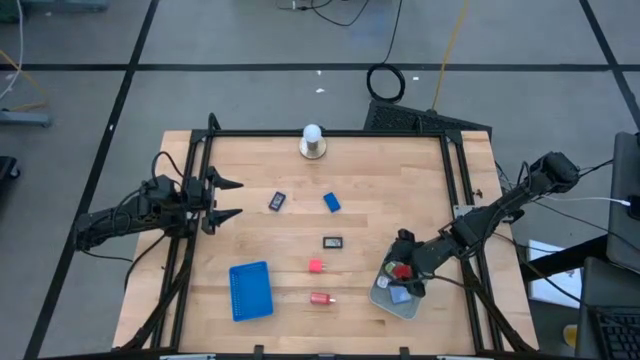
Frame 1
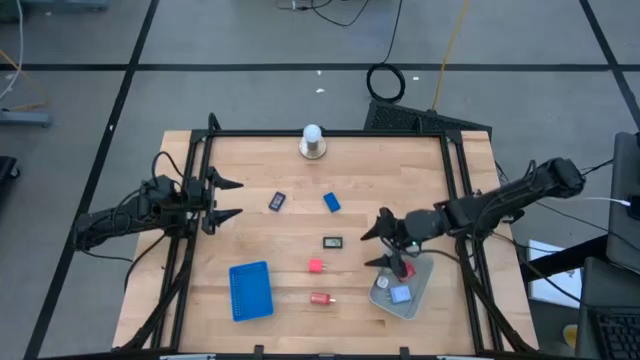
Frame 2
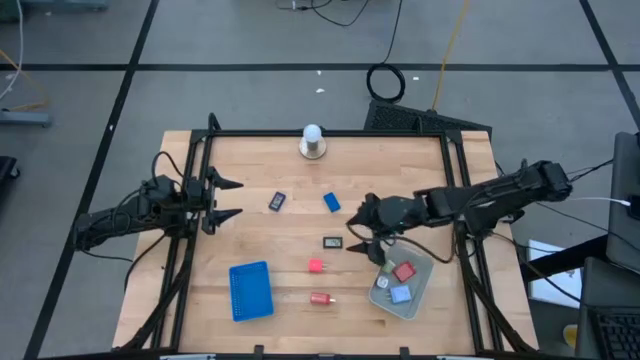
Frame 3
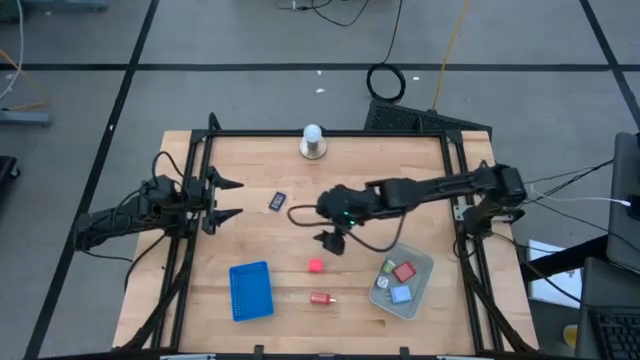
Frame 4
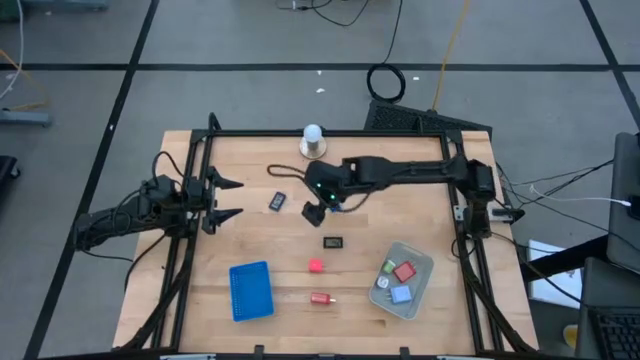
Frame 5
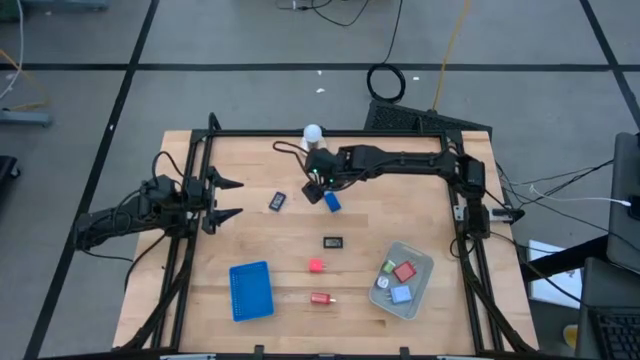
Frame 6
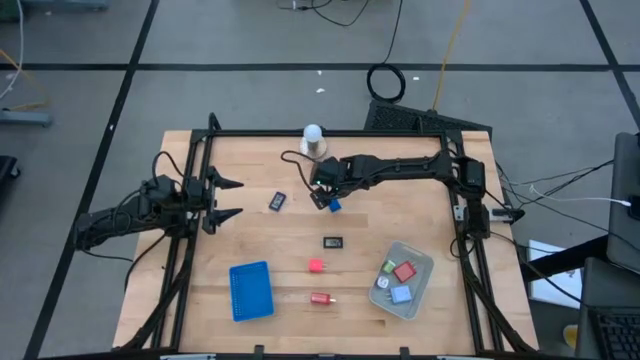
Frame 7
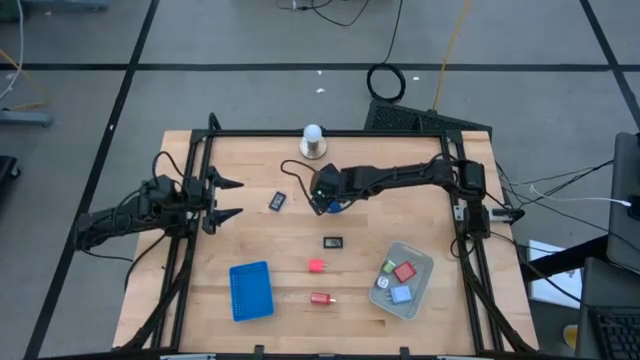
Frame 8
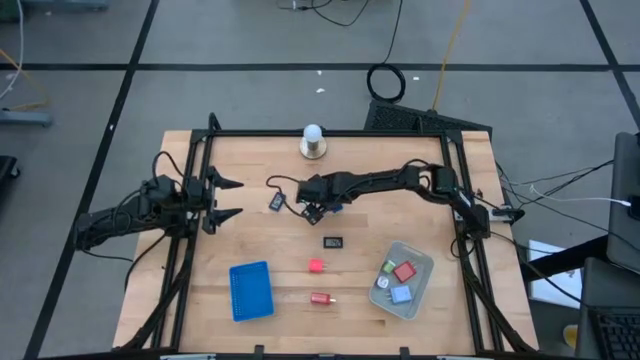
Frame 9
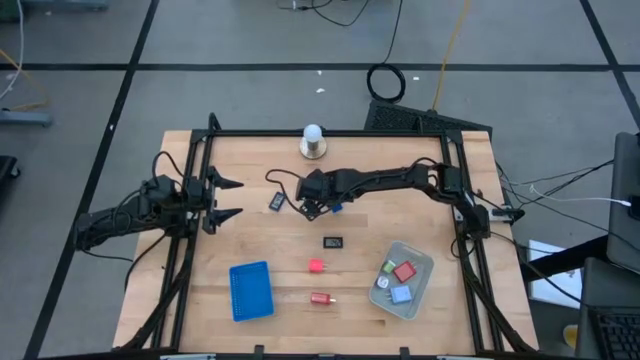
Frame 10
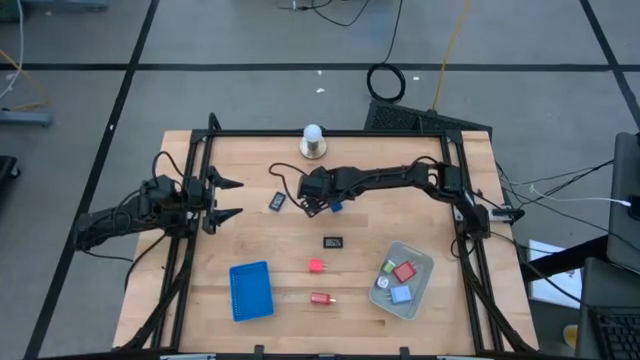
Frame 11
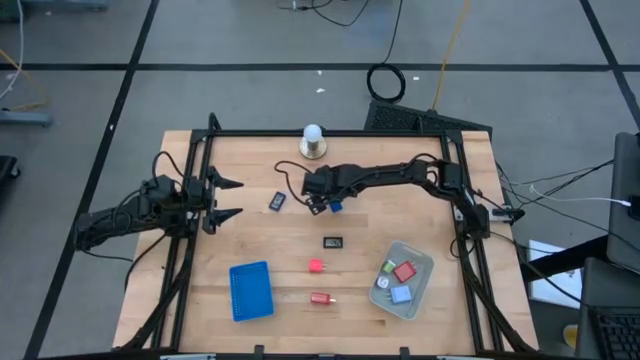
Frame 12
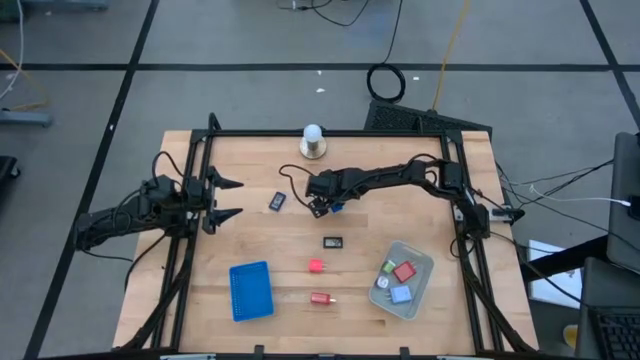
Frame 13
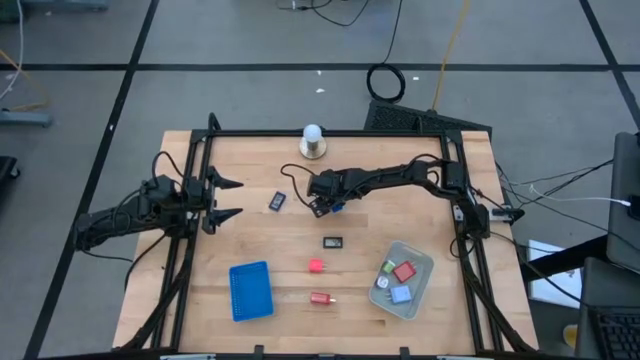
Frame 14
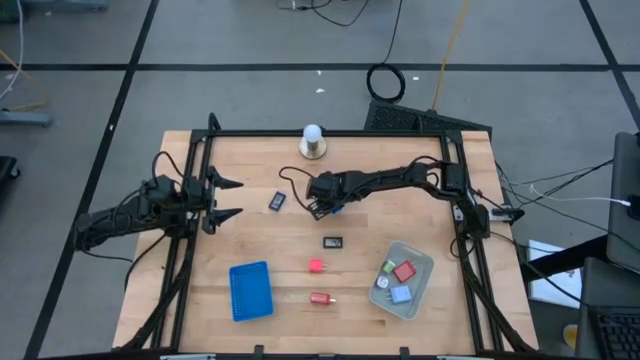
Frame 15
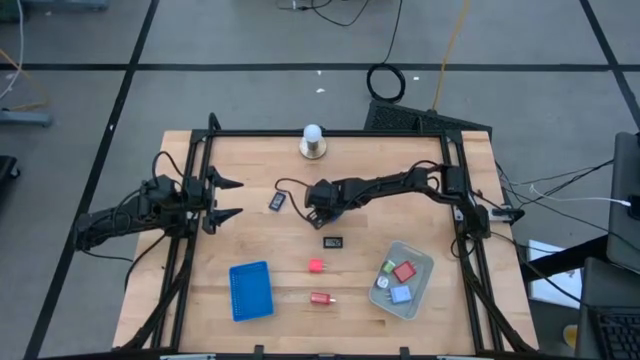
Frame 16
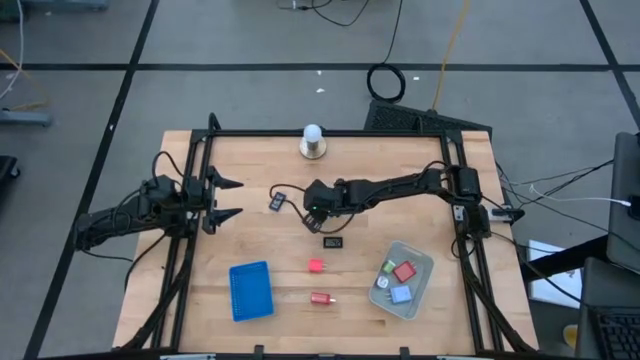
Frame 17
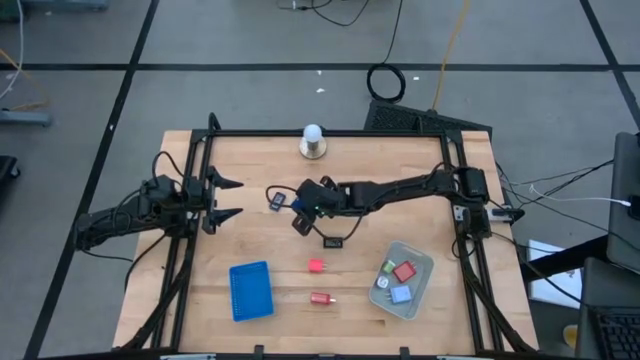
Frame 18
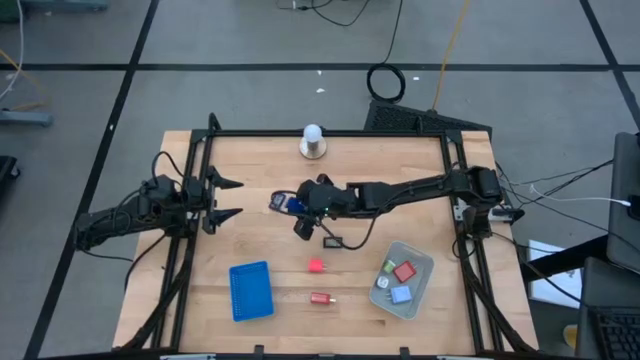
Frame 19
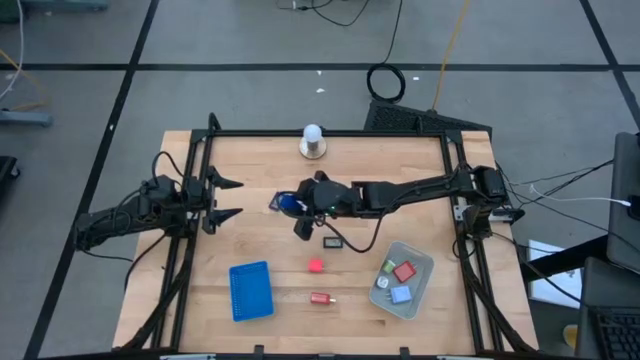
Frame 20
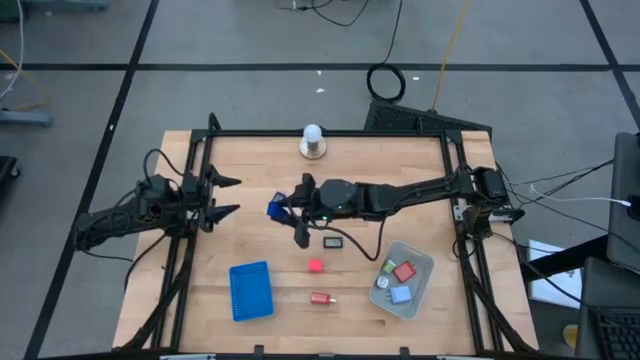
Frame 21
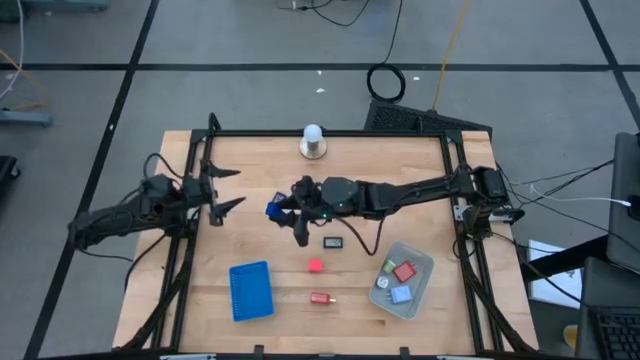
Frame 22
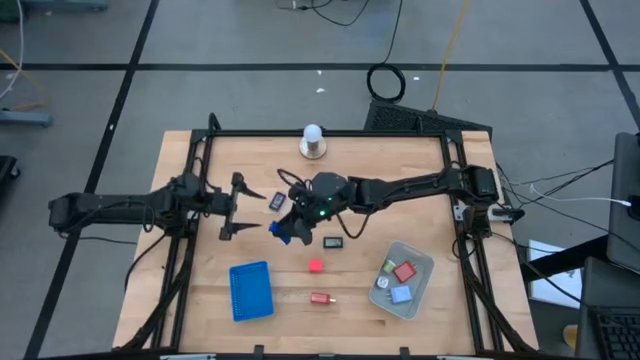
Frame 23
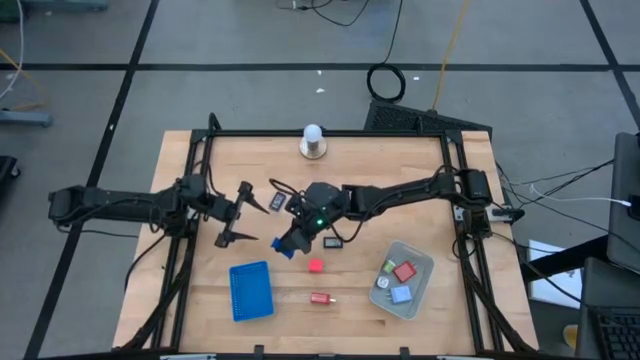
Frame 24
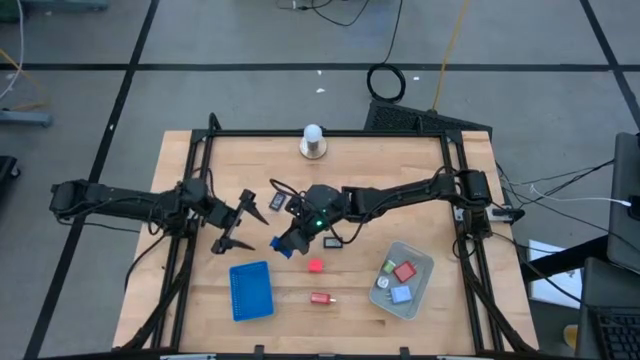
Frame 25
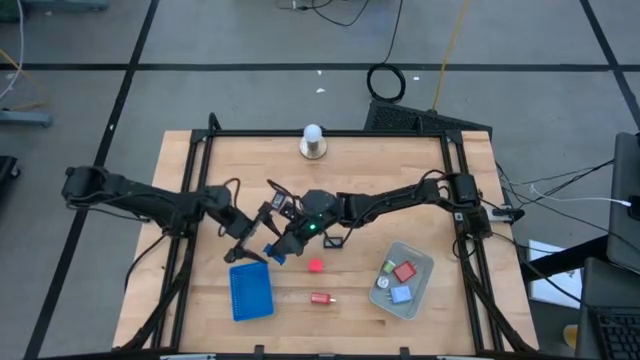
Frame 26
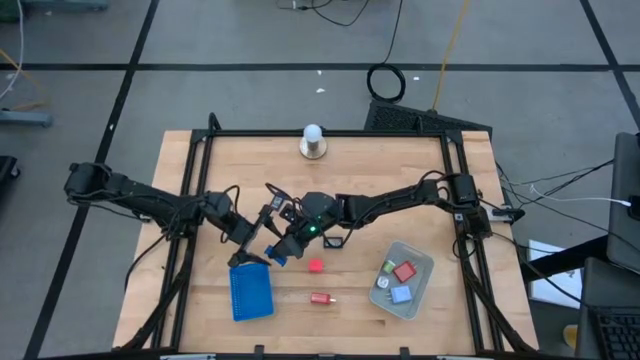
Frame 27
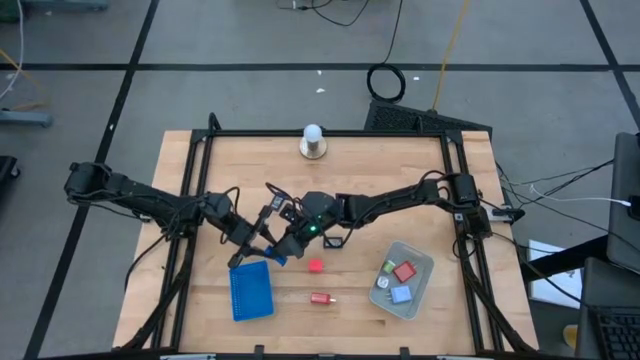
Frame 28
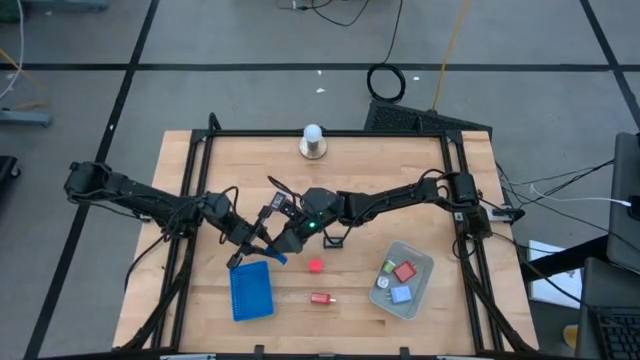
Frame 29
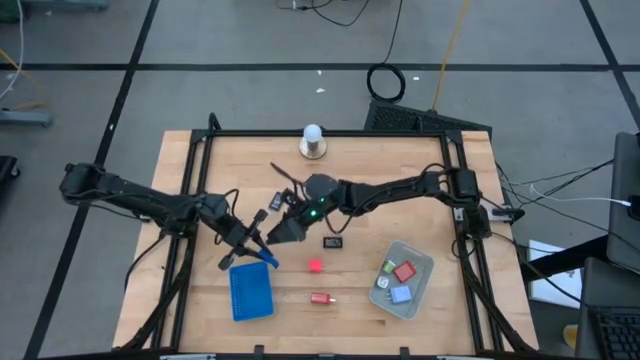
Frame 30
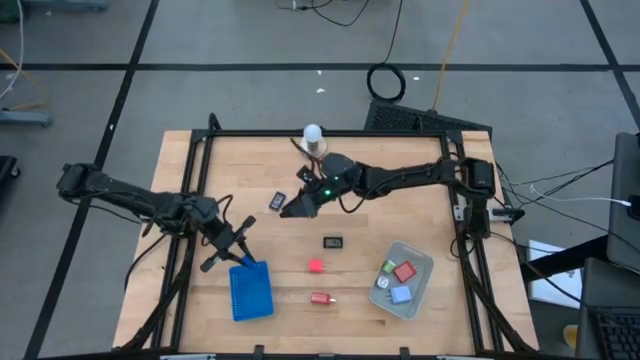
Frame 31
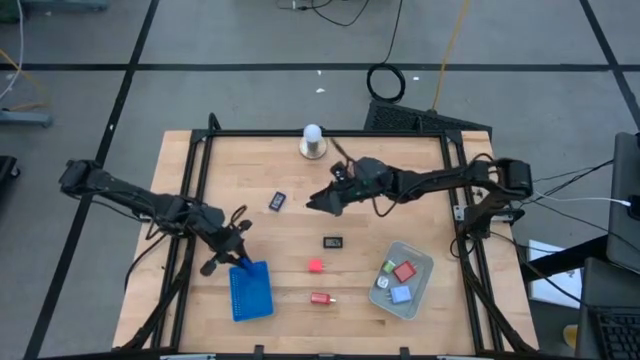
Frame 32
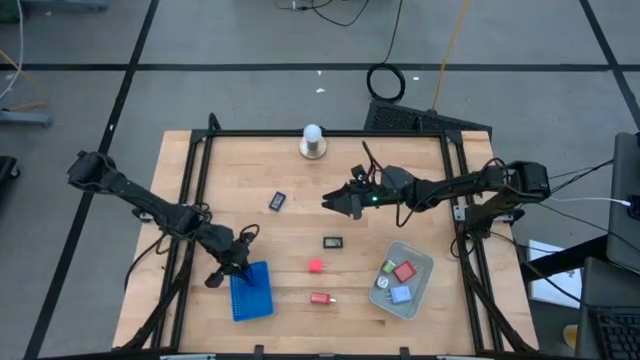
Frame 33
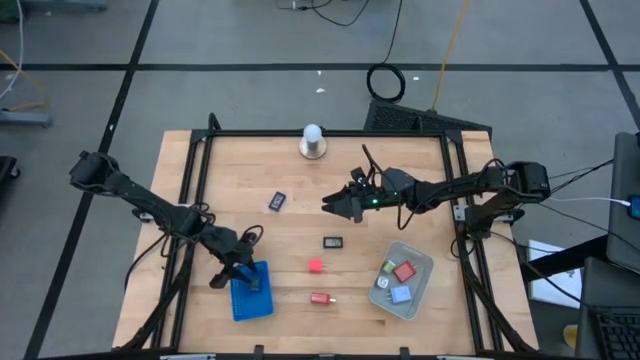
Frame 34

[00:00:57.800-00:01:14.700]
Task: Pick & Place Office items
Put the blue digital clock into the blue bin

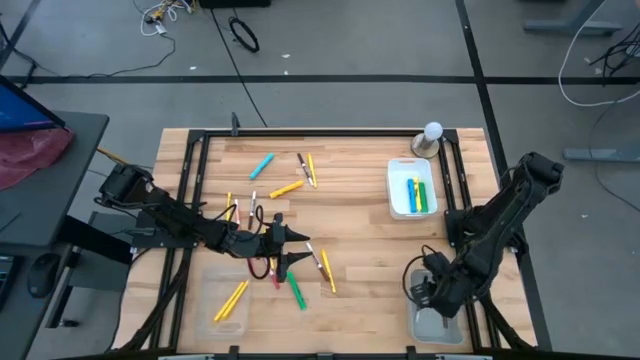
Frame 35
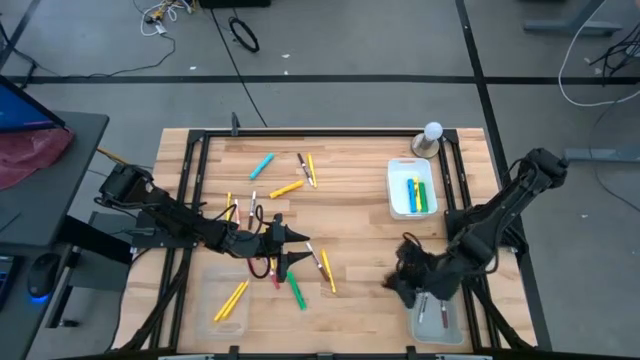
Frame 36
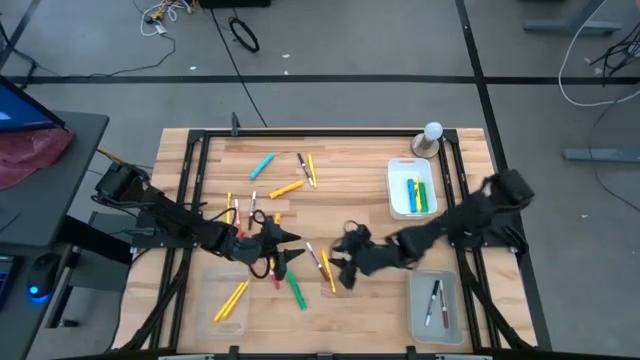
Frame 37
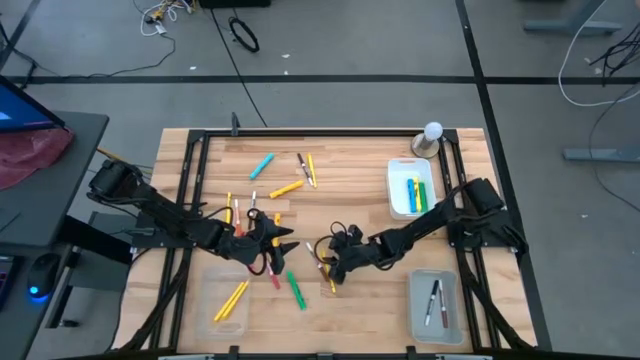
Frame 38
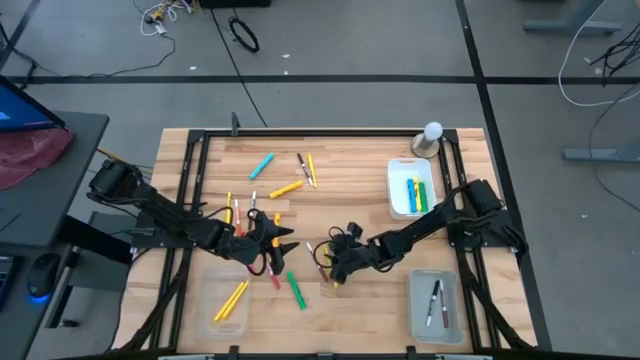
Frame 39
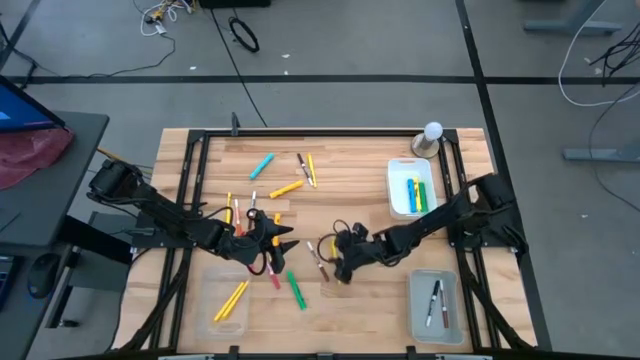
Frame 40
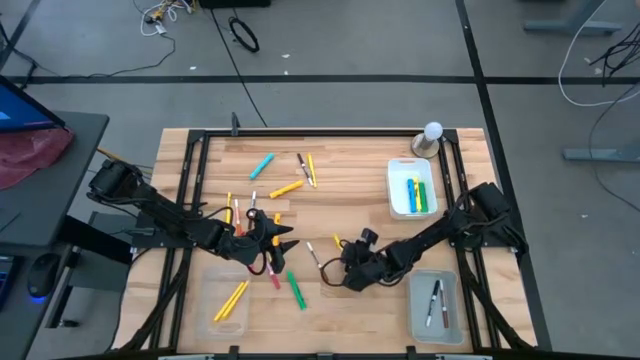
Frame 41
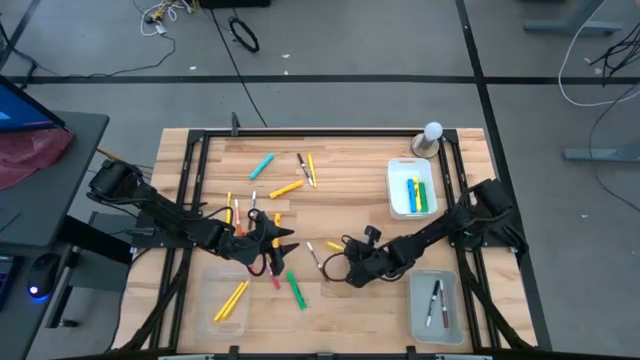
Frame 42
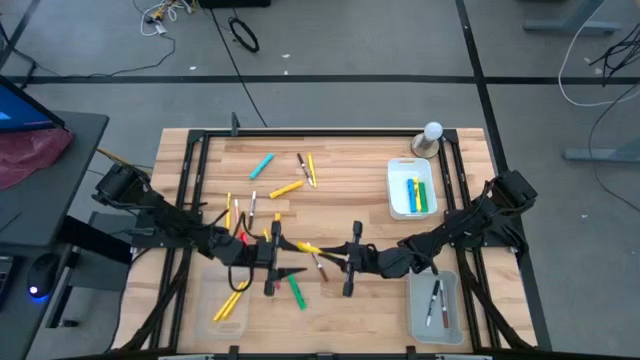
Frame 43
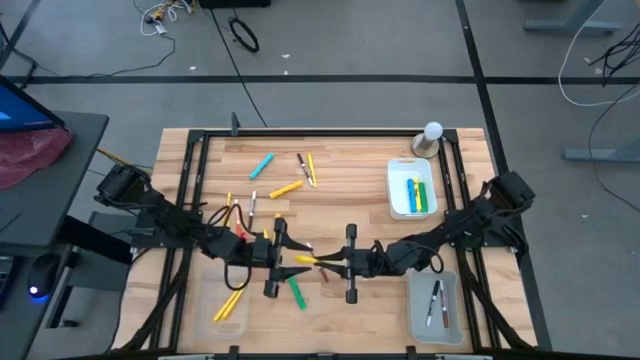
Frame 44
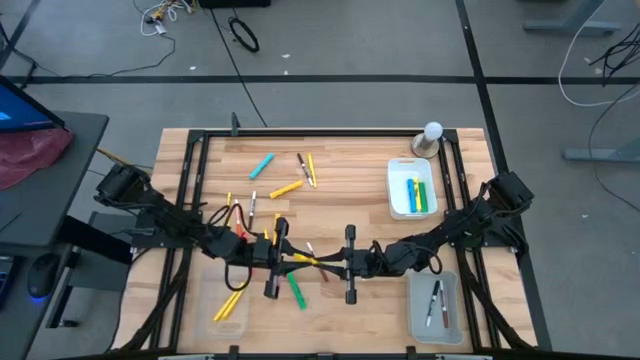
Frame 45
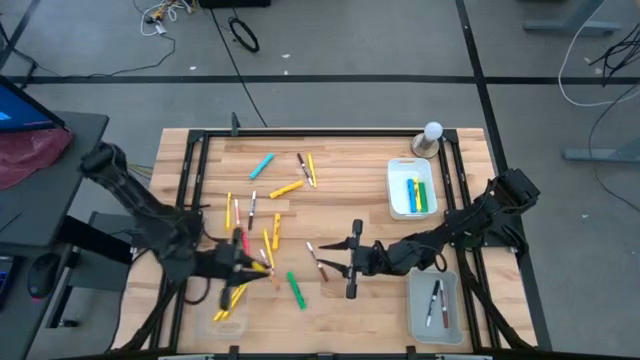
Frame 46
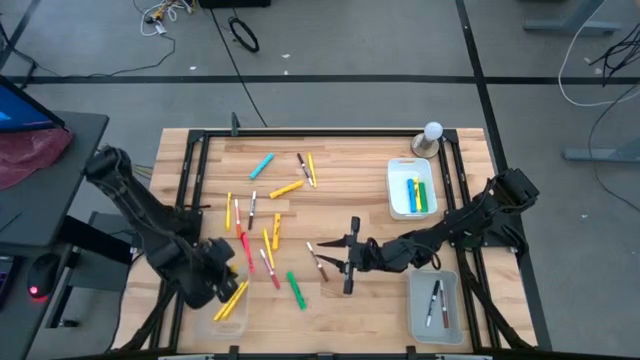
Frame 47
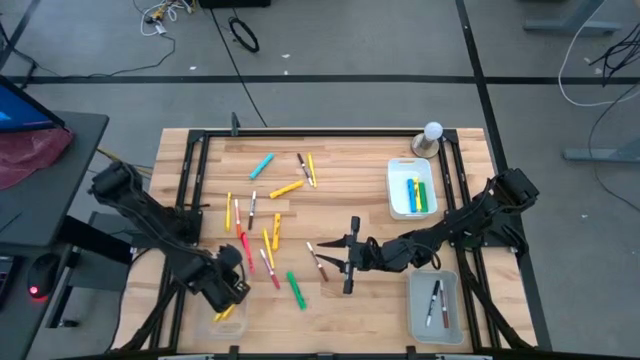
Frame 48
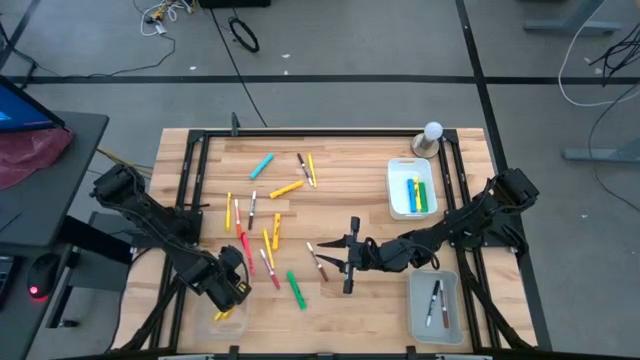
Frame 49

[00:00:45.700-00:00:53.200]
Task: Pick & Place Markers
Put the yellow pen into the transparent bin
